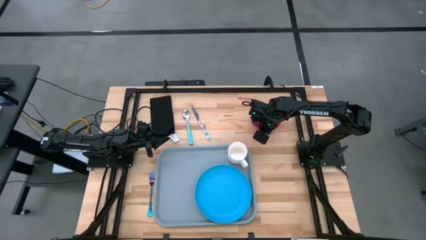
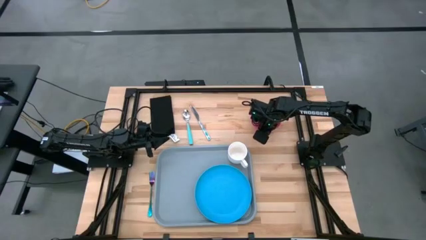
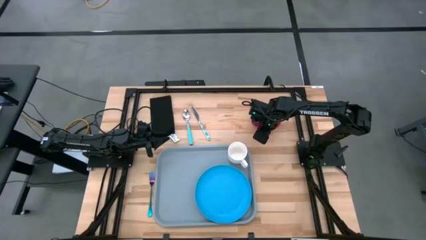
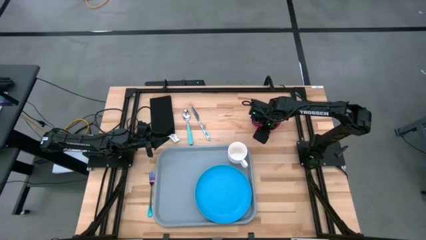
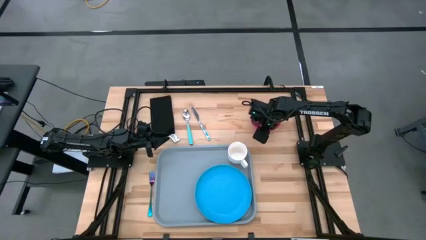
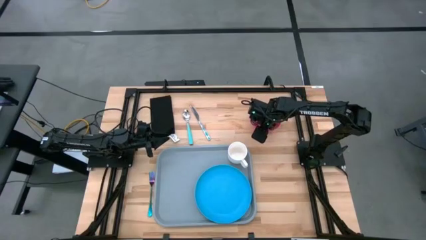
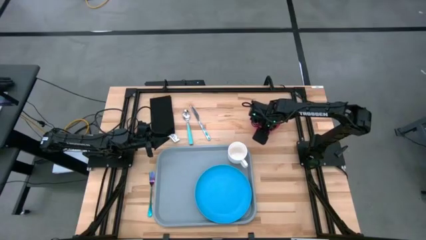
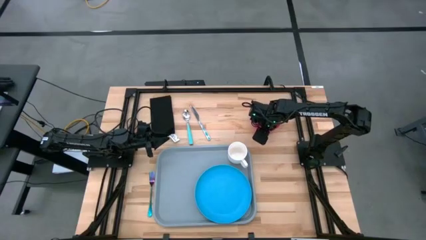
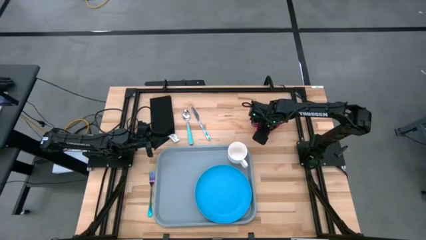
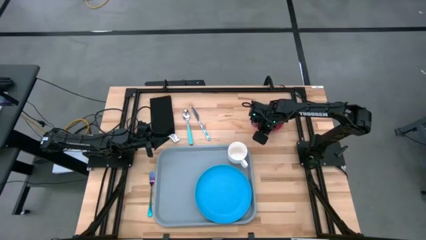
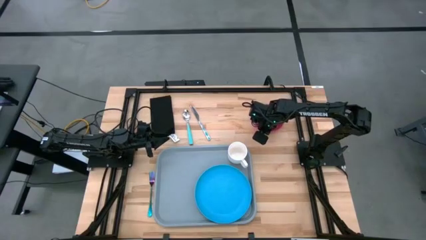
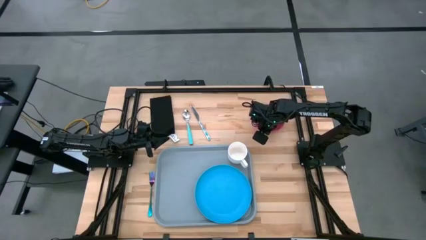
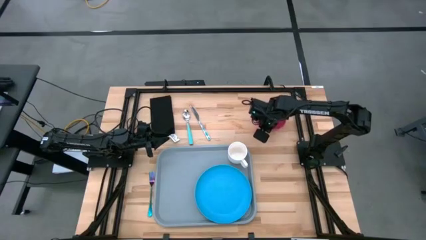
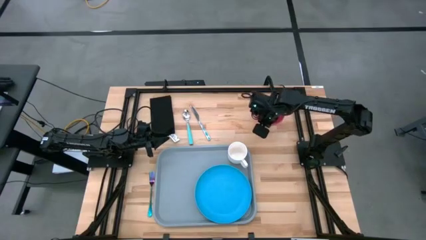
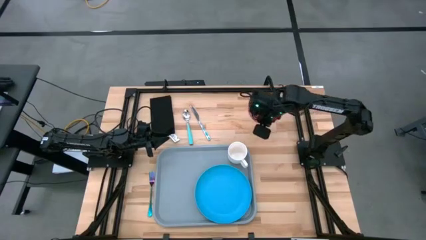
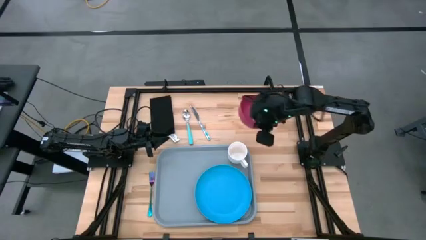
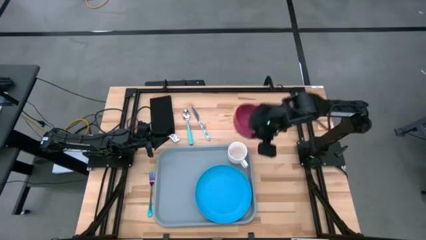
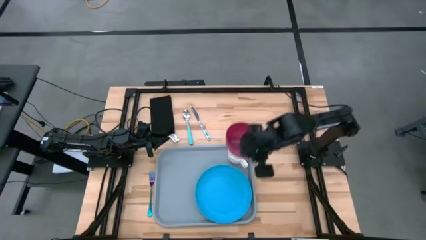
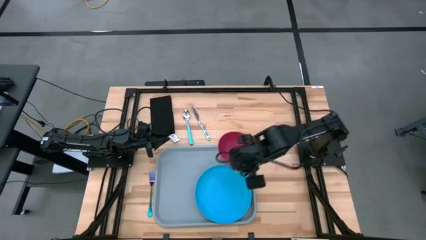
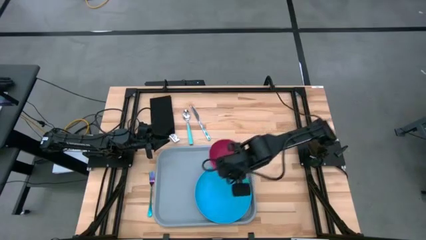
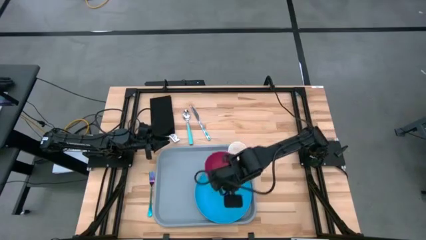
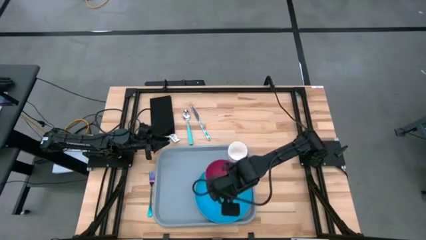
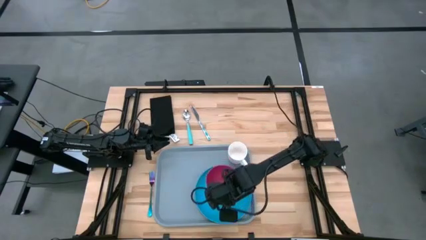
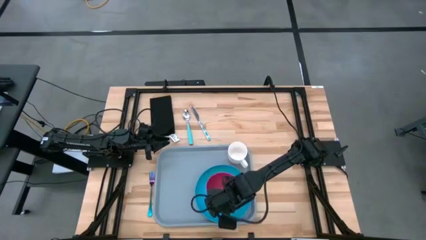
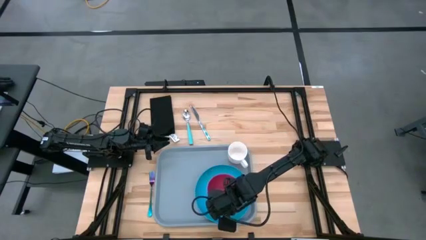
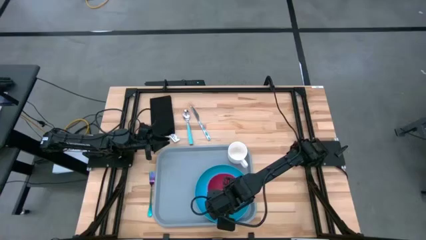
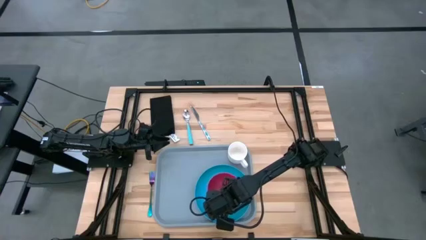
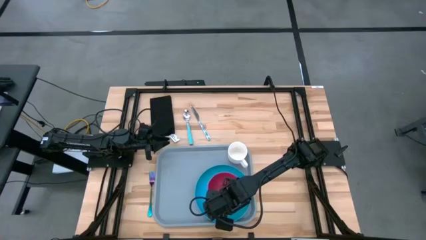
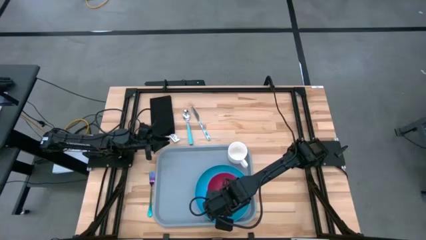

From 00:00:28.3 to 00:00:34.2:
Task: Set up tray
Put the pink bowl on the blue plate on the gray tray

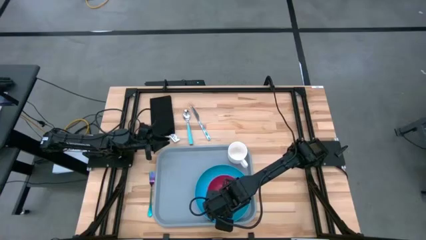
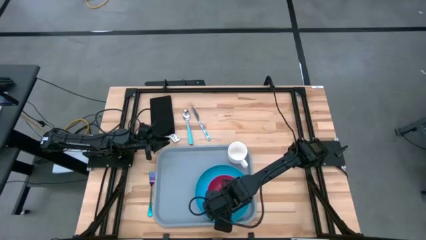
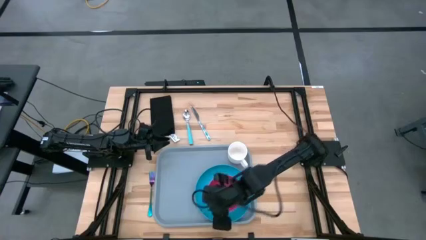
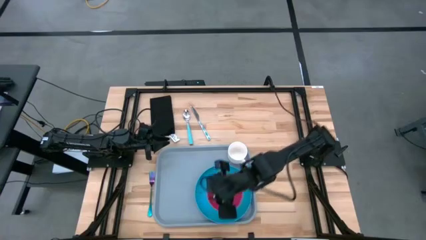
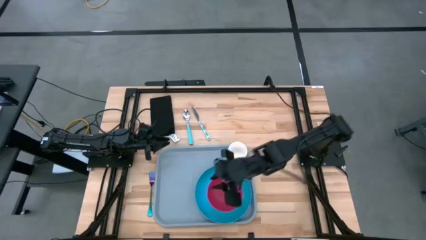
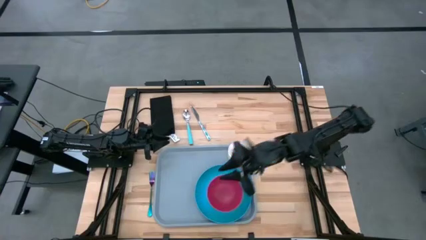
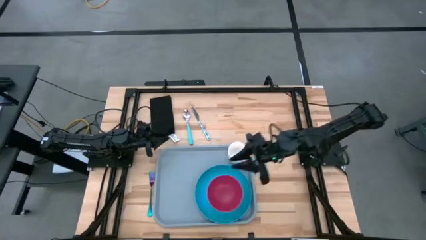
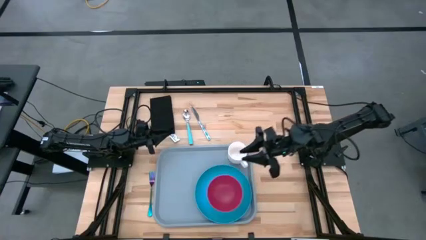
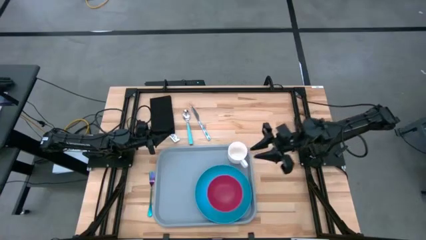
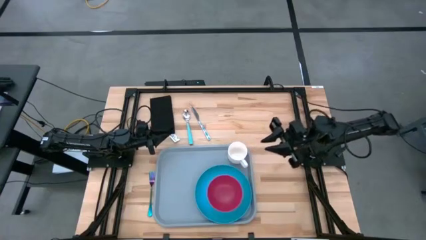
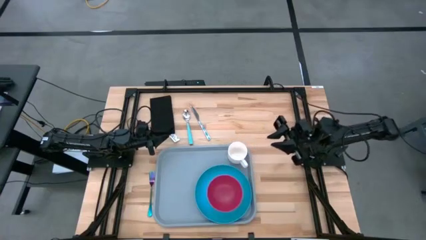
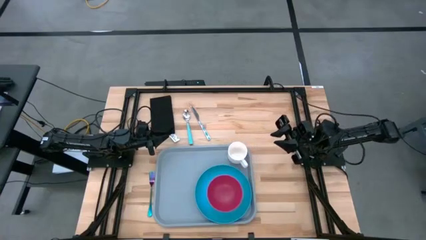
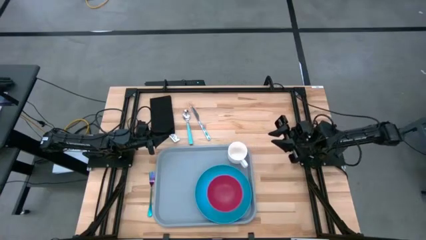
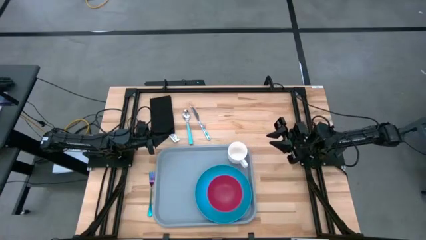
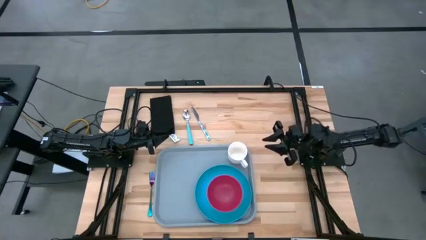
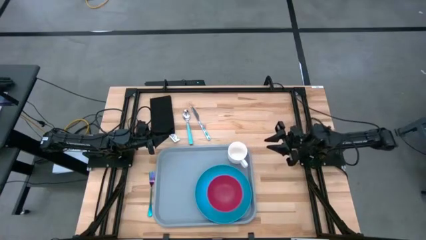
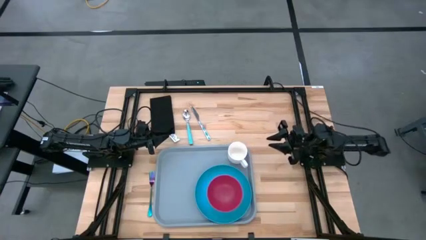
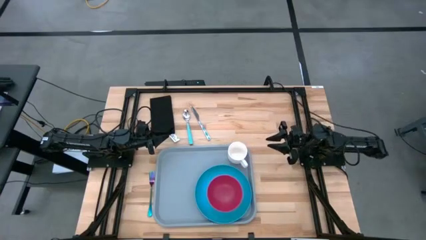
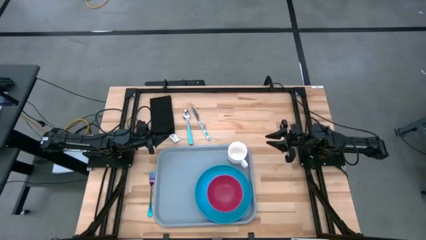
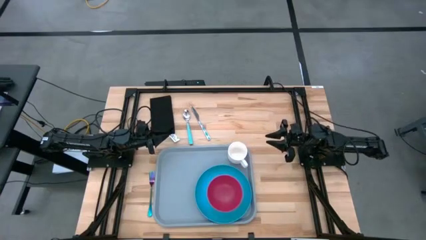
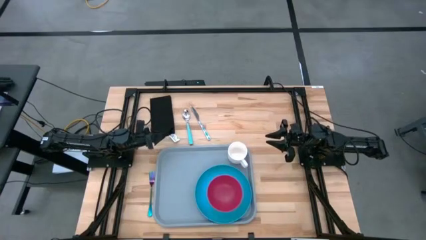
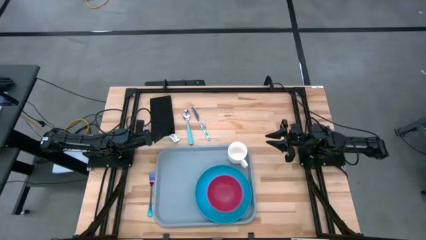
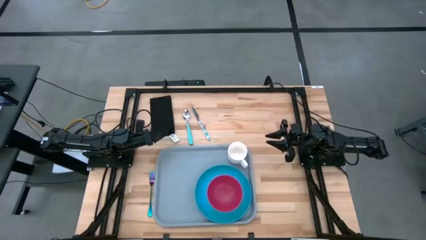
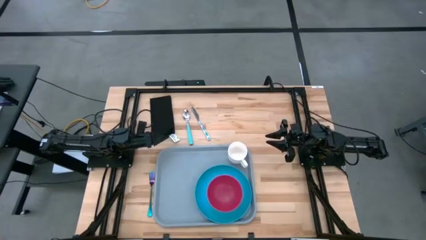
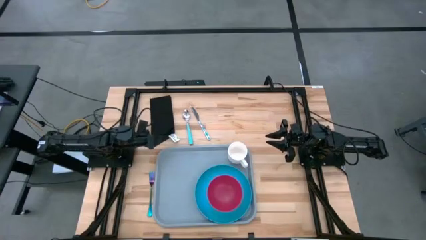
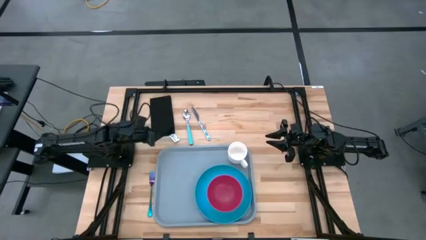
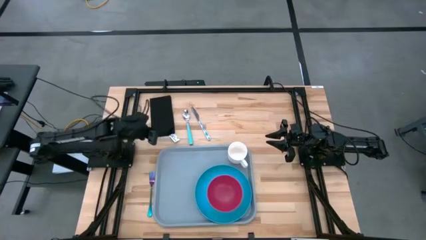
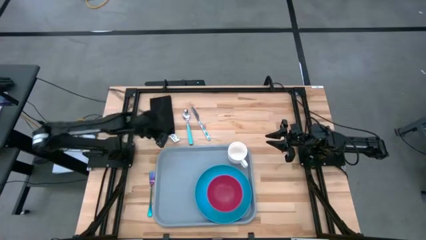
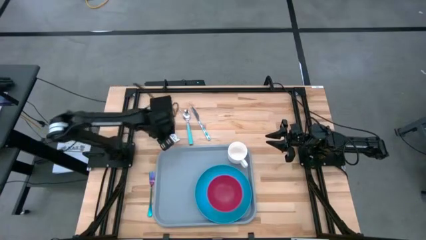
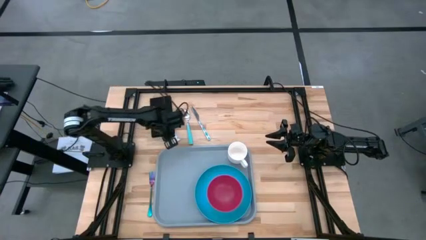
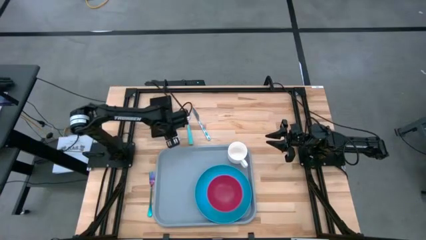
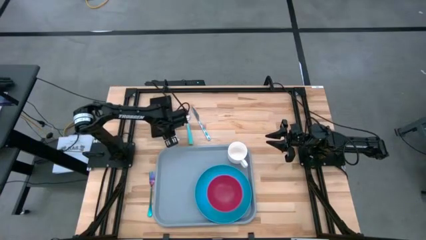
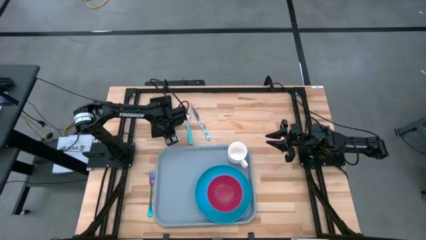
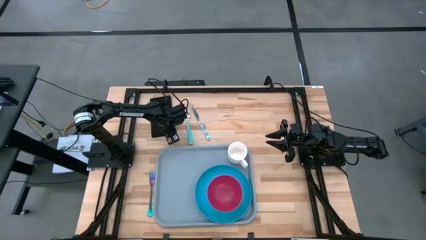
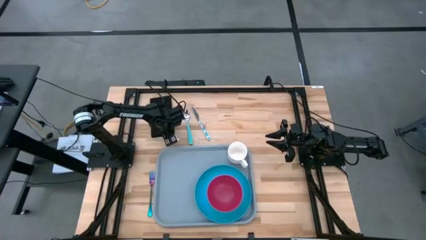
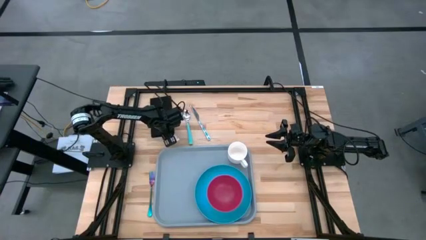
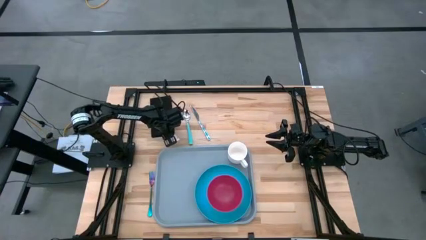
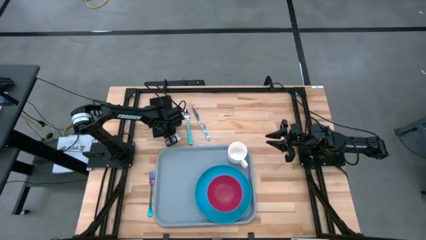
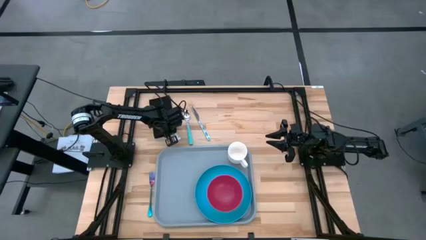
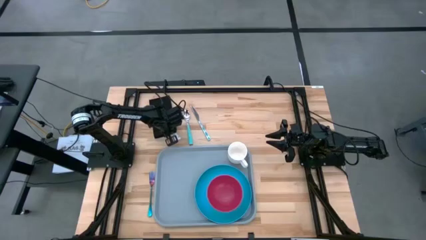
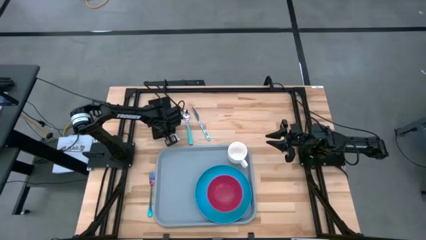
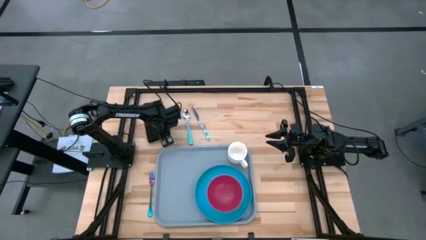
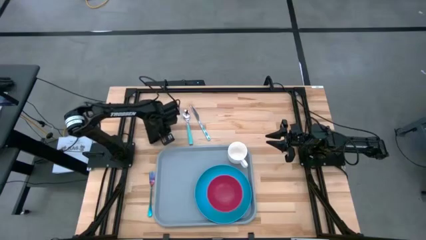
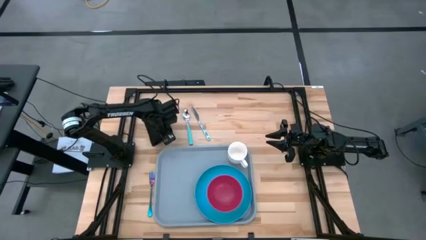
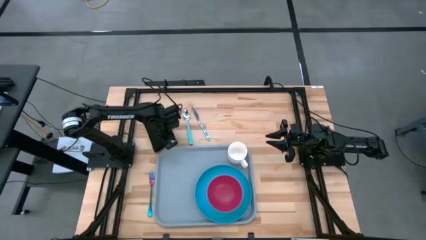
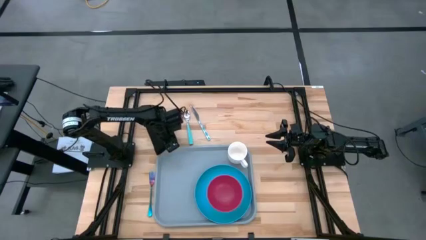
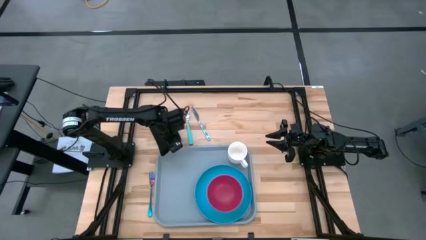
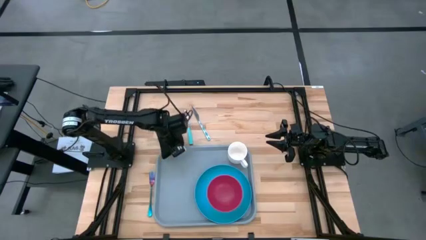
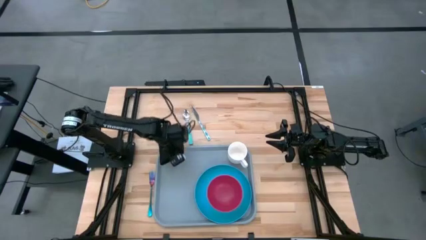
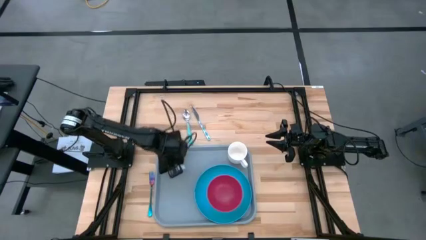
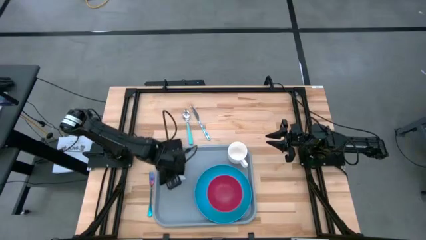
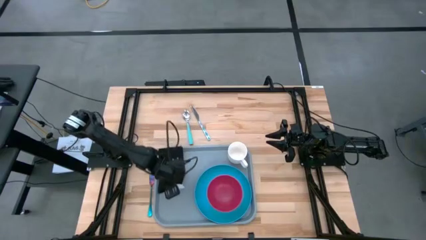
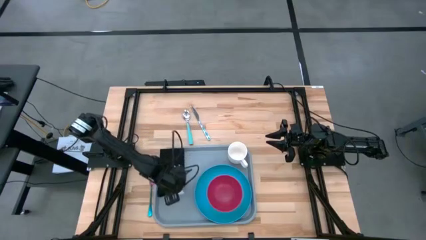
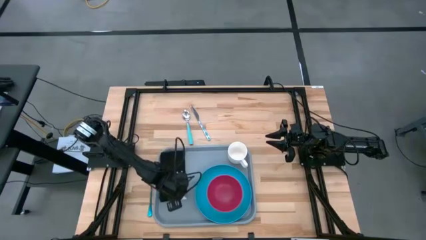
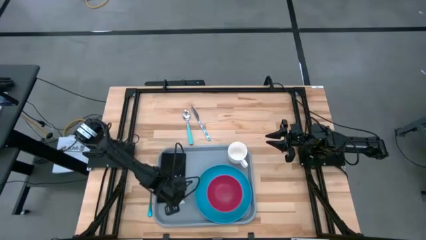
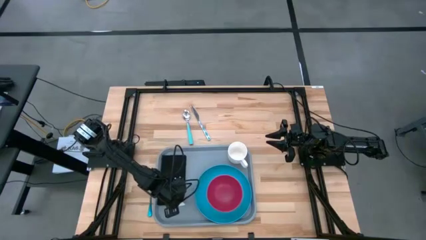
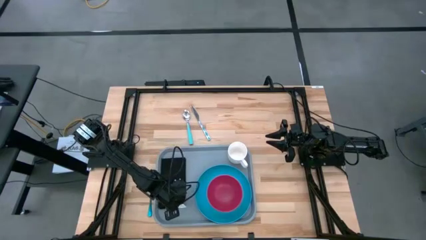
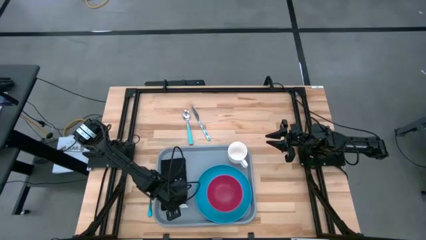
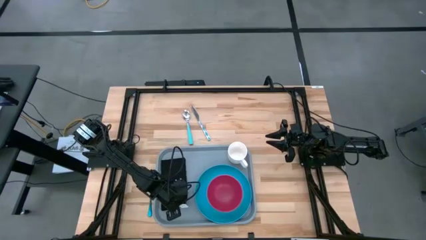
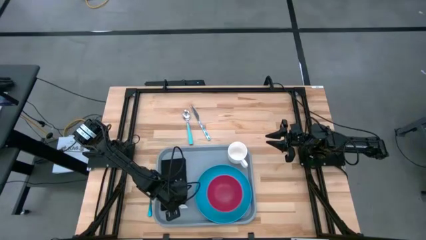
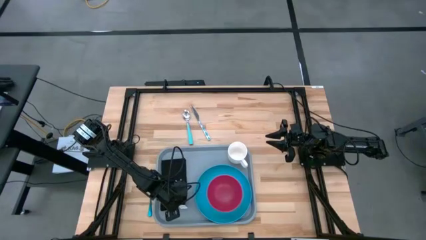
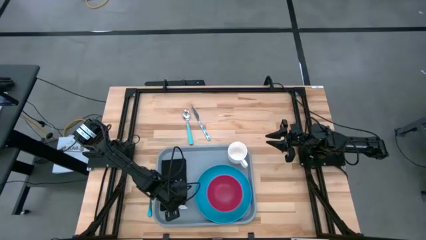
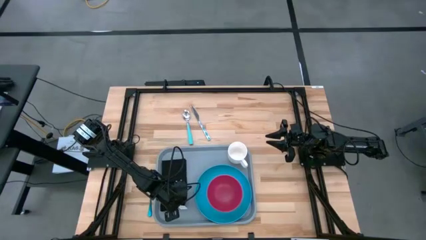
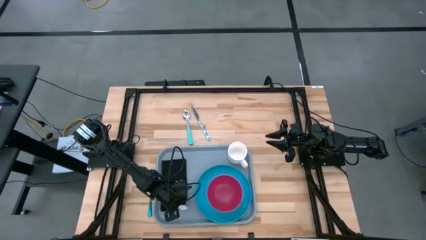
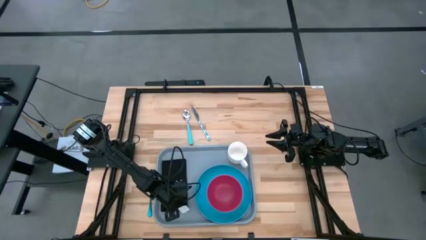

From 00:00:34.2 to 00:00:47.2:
Put the black napkin on the gray tray to the left of the blue plate
